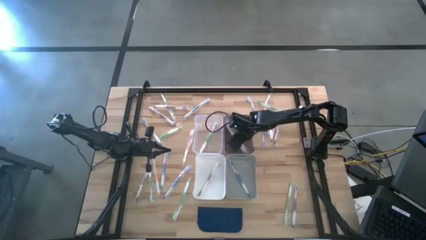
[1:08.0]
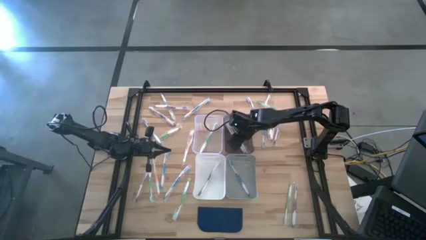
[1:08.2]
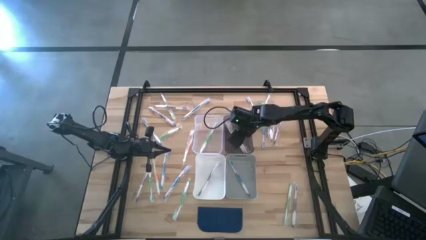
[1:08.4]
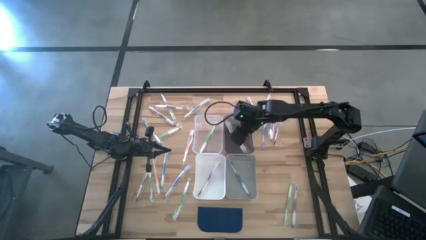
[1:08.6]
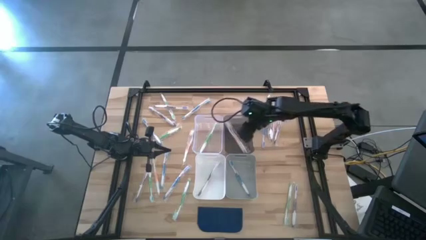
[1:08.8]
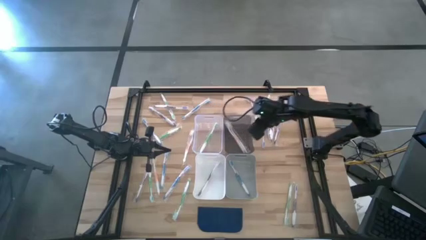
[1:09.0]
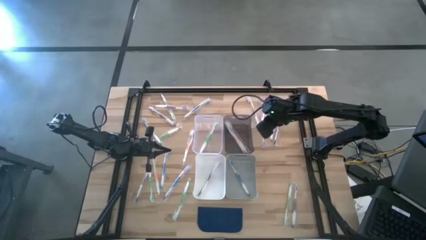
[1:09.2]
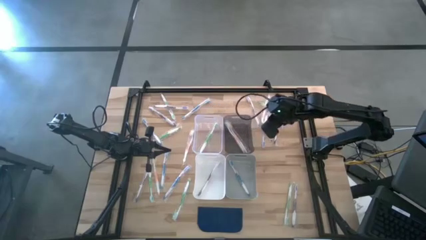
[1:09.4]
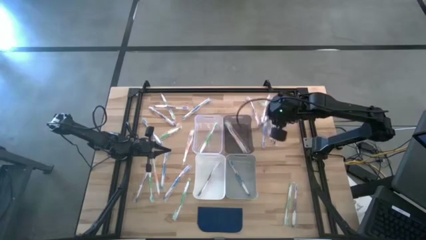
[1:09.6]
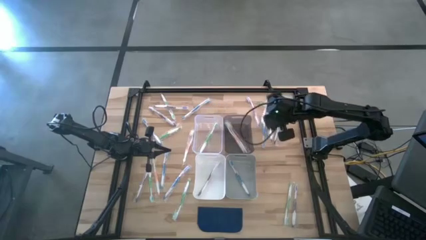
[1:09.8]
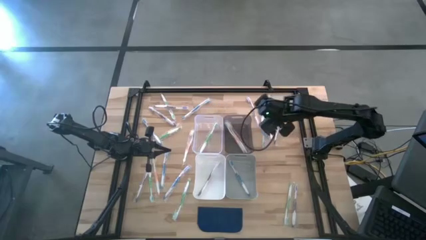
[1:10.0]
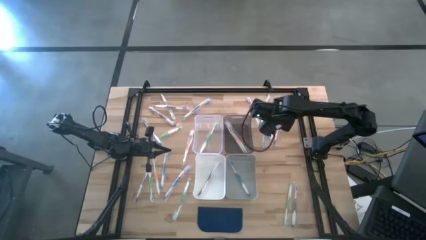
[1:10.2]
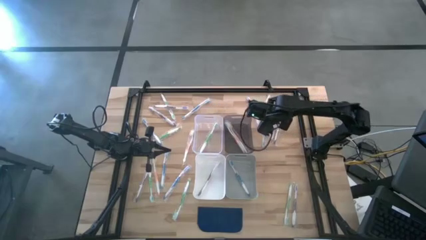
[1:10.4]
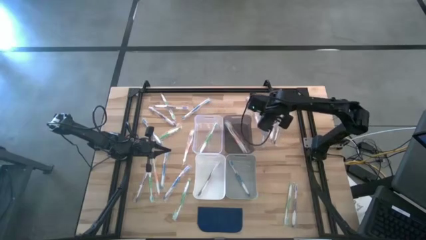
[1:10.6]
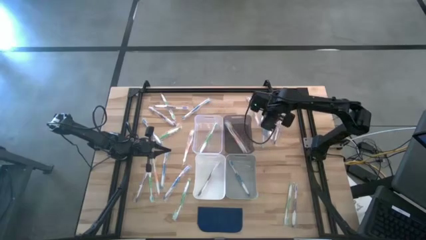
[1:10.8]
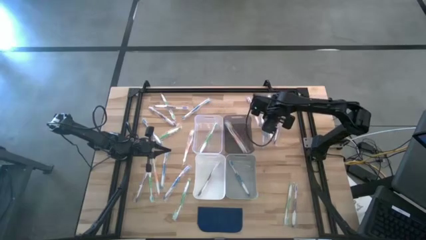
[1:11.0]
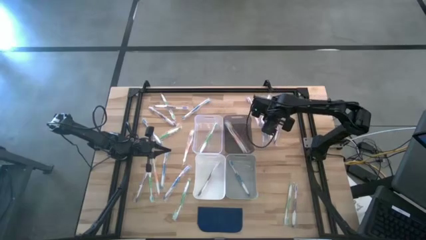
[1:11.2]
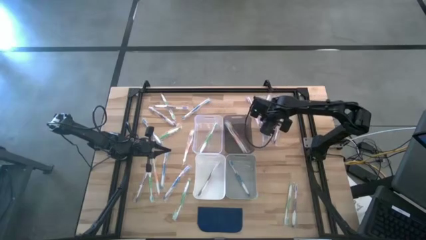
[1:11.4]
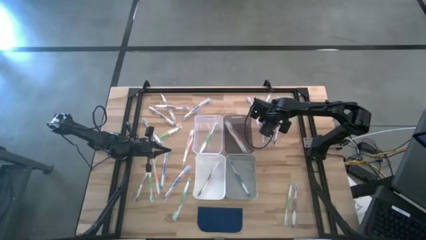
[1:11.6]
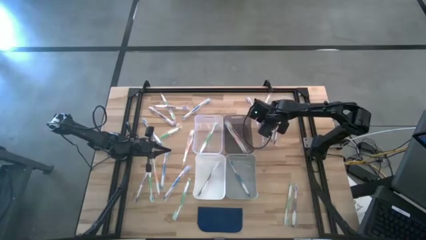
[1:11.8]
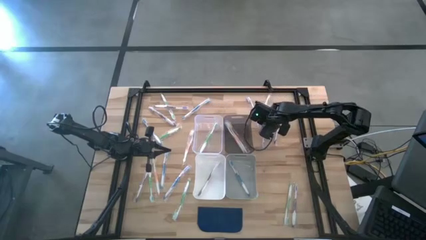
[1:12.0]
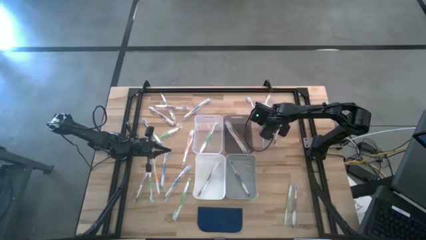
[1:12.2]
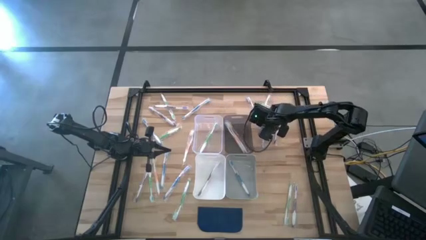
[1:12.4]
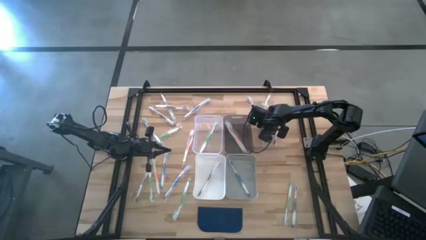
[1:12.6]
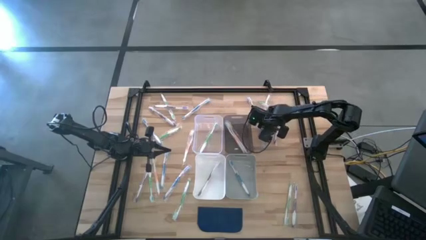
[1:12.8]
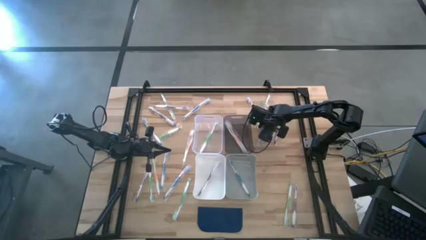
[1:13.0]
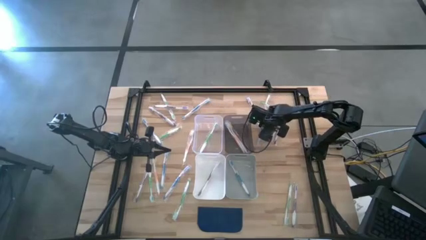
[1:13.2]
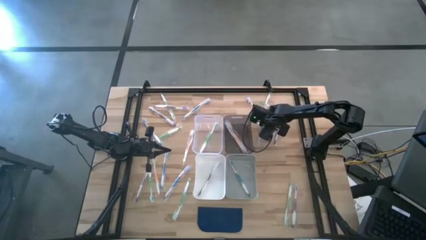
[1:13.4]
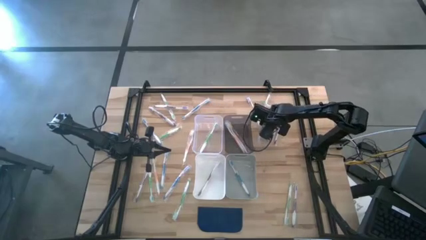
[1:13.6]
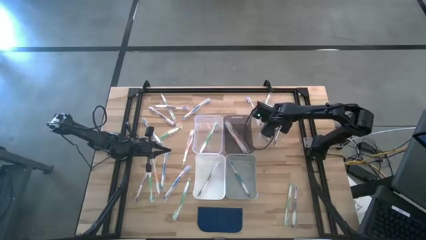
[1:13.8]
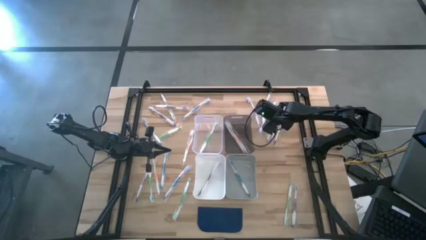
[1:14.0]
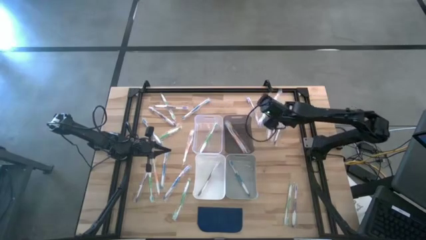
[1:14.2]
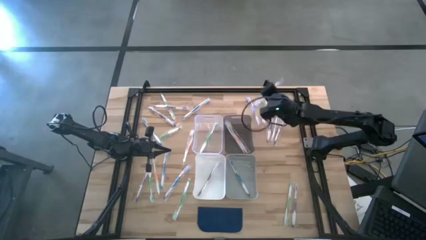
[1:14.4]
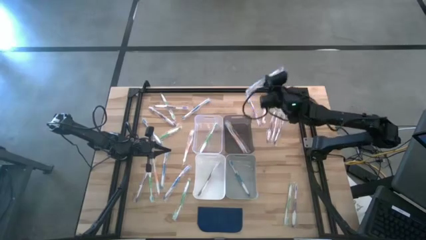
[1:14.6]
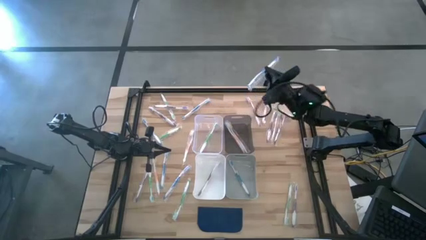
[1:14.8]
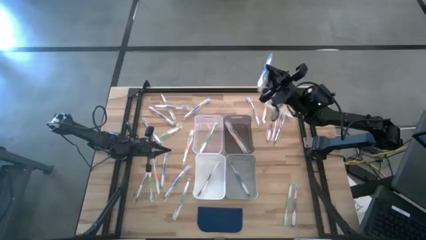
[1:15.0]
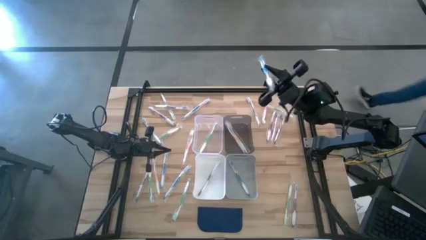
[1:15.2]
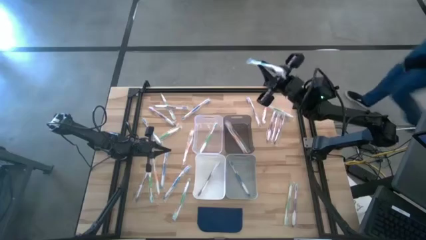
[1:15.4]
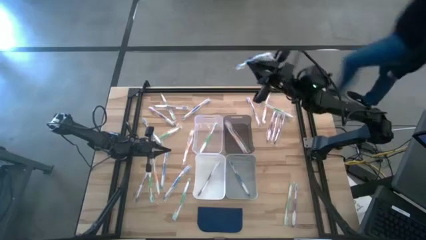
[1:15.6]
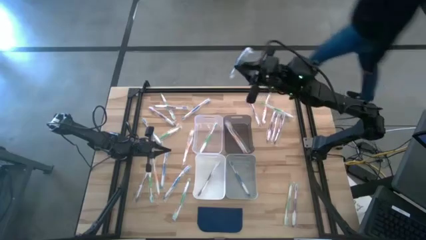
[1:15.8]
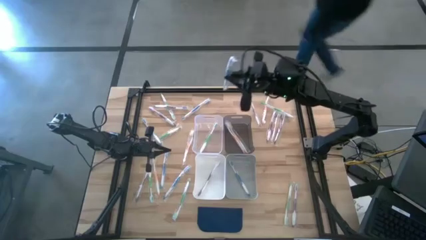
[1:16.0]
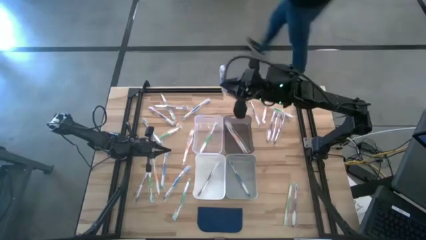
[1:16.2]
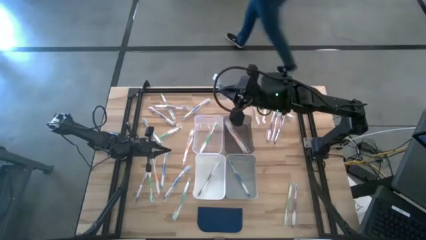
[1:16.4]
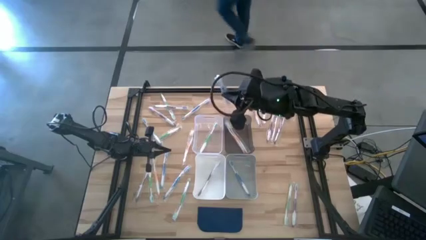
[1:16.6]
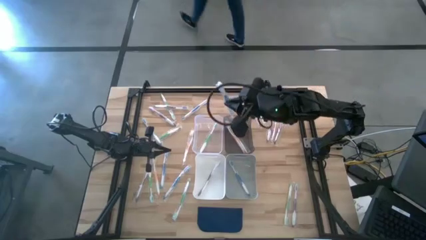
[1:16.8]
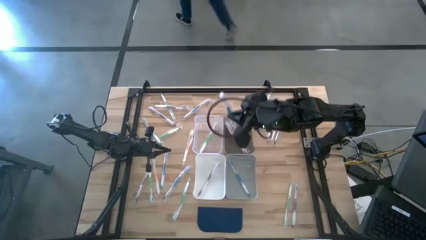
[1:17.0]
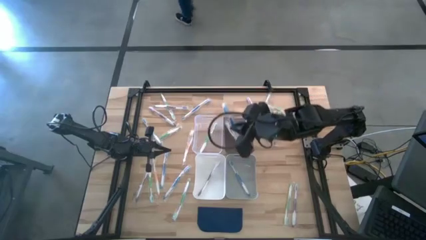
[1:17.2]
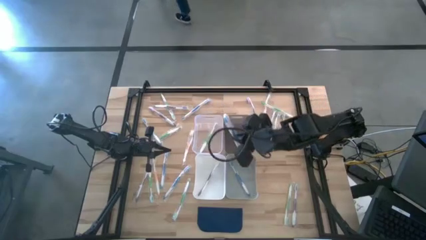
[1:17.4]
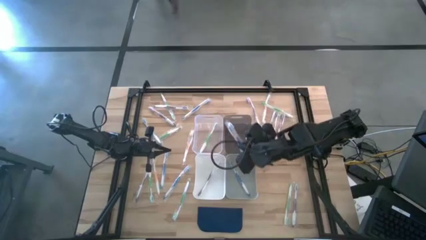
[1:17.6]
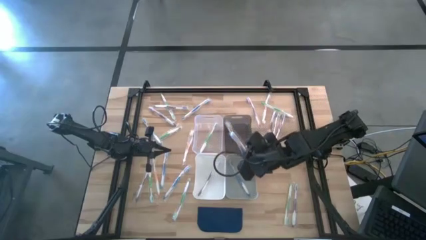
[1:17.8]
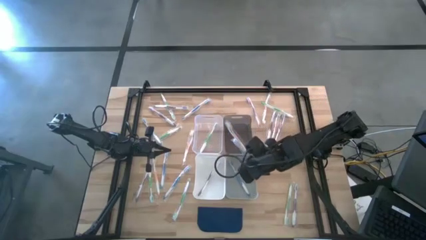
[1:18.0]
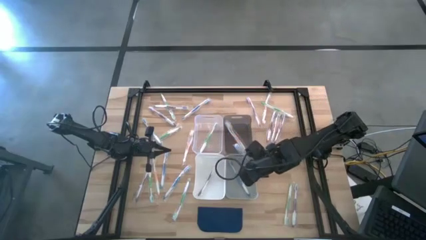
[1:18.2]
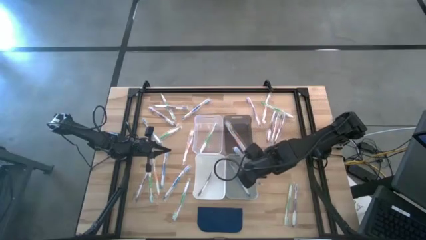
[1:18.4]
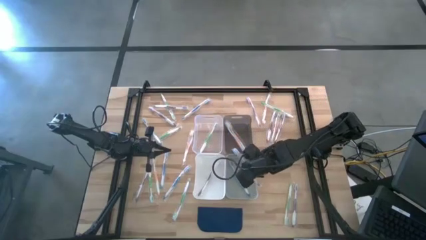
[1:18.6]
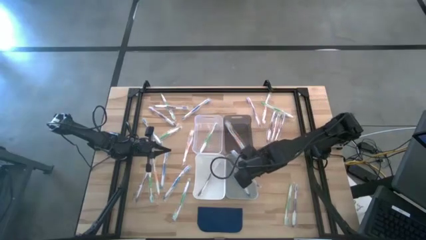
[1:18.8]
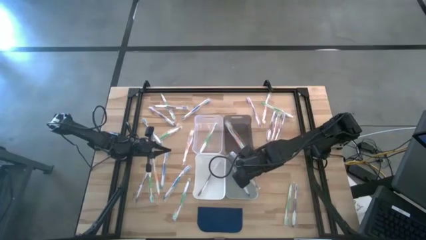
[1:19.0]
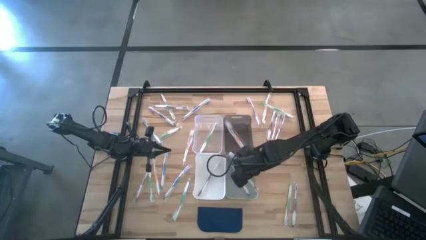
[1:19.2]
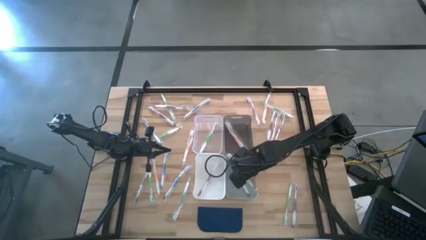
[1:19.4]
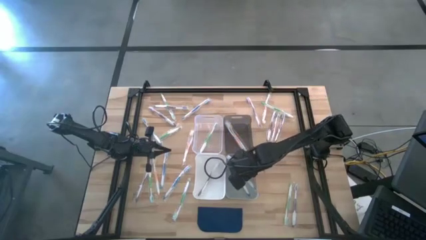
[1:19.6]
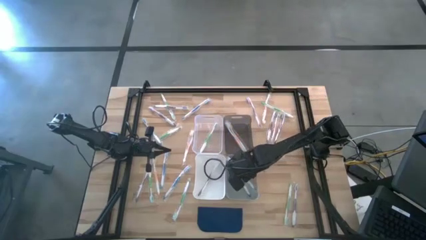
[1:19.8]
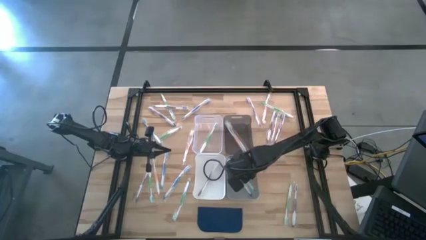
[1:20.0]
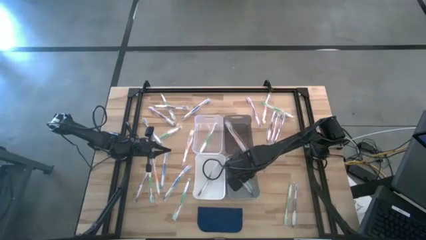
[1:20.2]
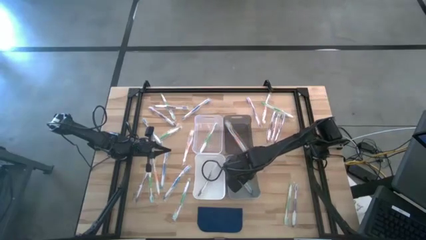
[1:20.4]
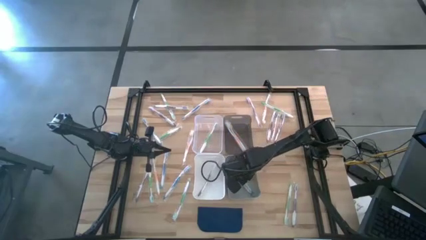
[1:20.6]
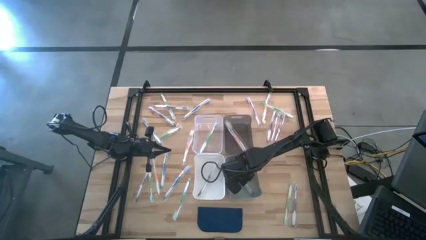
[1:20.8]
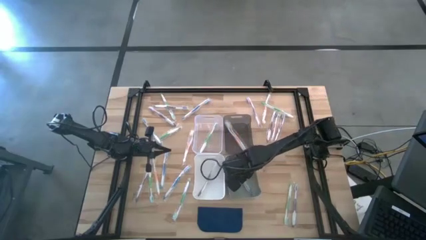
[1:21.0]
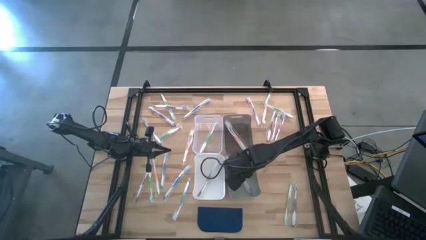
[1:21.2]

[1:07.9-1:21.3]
Task: Pick & Place Toothbrushes
Put the blue toothbrush into the gray bin

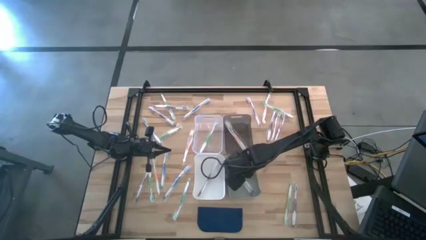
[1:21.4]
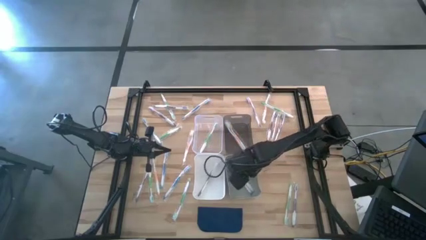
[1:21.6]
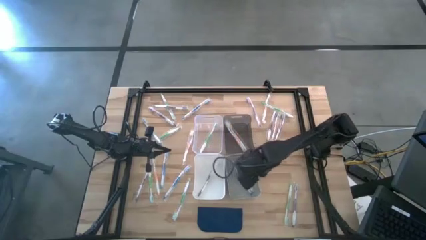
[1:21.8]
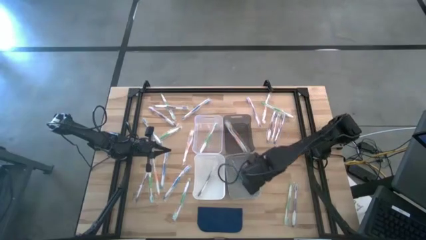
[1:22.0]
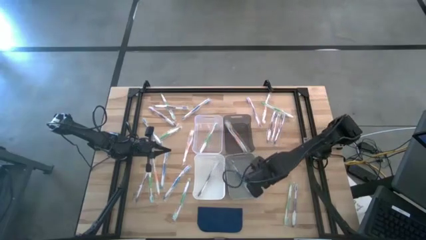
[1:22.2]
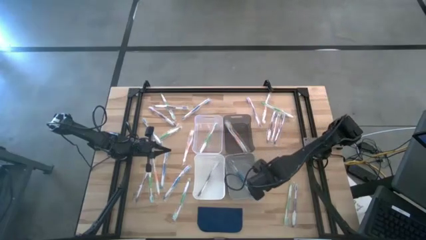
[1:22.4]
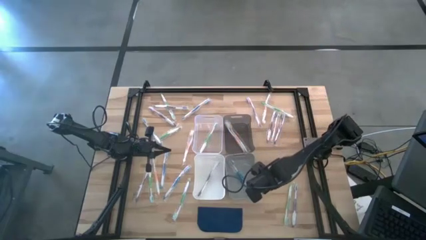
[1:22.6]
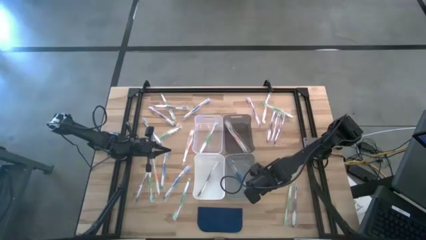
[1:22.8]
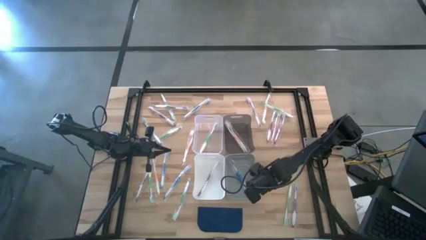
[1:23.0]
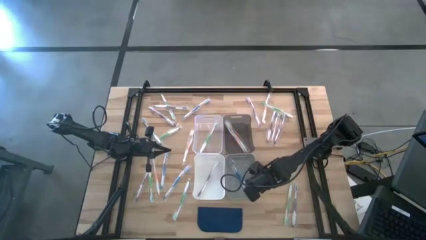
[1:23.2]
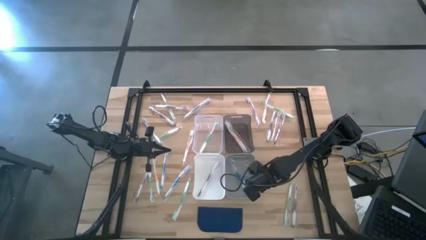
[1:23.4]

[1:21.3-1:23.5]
Adjust the gray bin

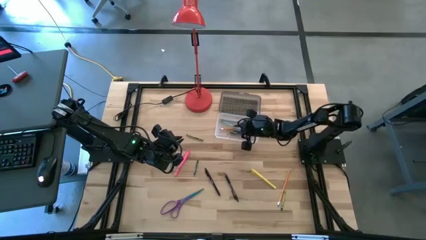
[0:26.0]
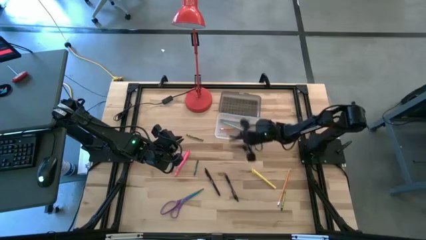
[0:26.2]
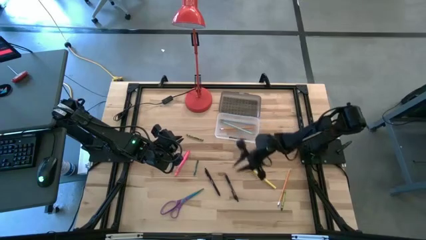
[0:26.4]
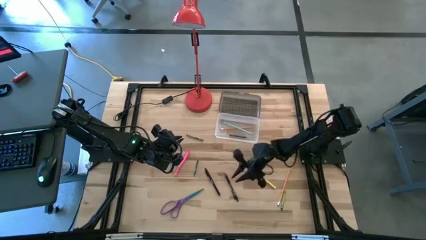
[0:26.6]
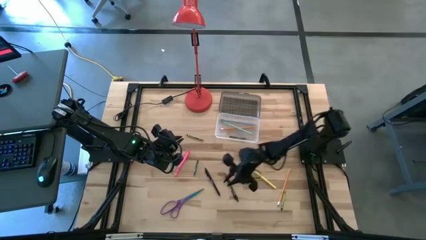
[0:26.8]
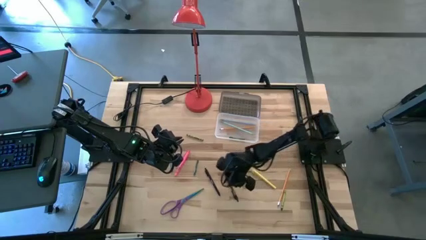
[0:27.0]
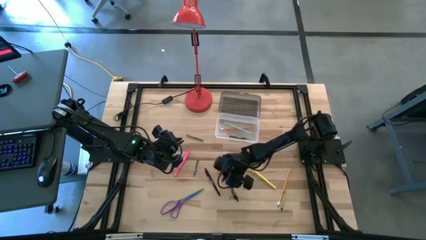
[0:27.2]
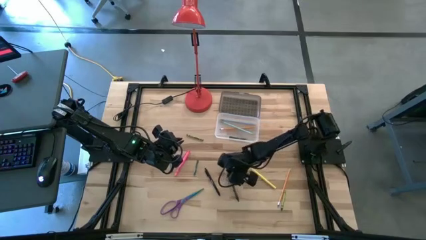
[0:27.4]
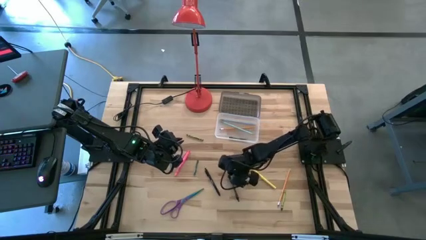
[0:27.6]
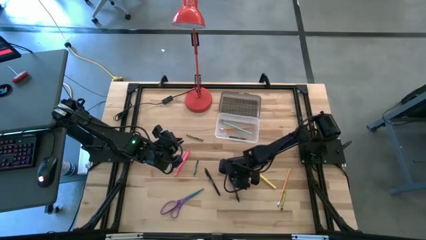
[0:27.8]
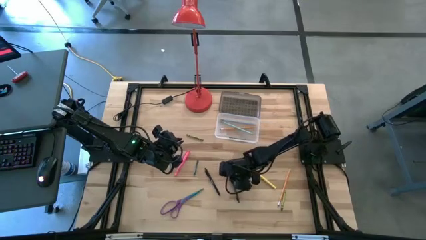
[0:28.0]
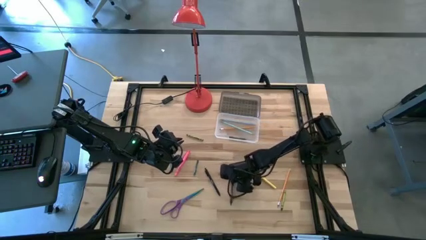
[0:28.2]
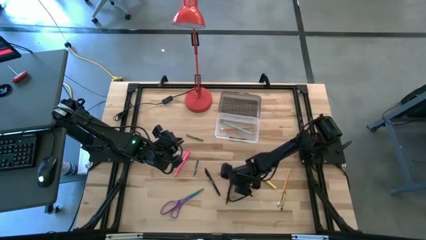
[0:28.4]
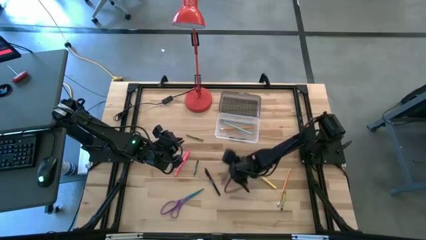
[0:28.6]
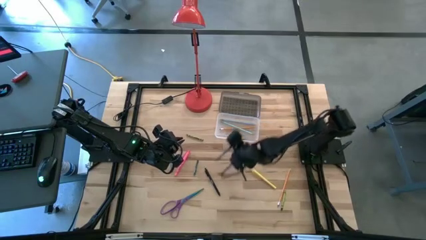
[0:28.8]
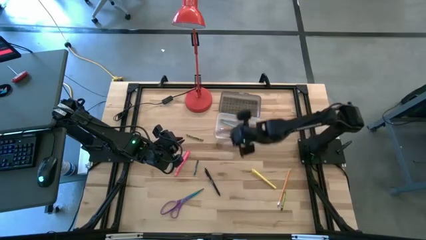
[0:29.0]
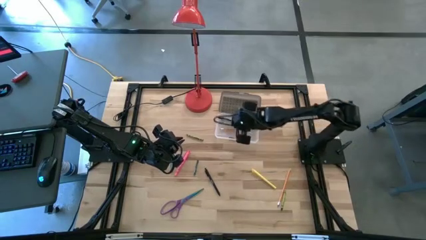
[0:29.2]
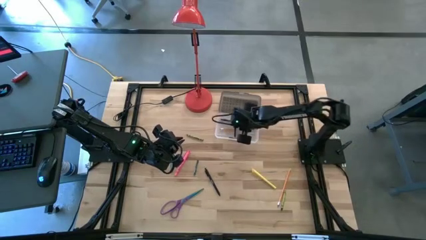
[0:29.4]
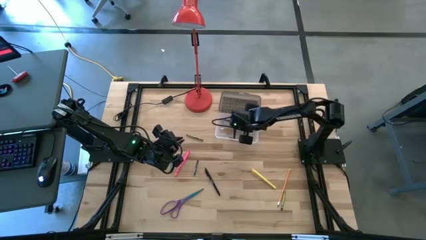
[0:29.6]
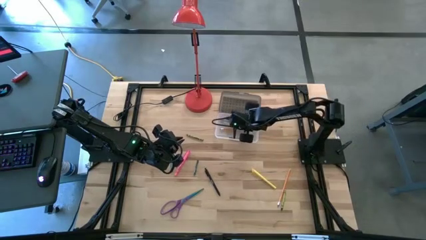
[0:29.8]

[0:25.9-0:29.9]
Task: Pick & place school supplies into a supply box
Put the right black pen into the black supply box
